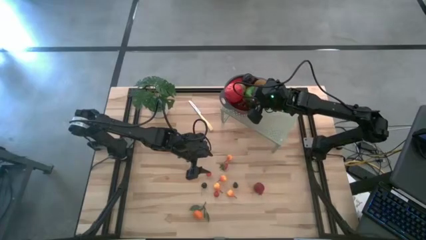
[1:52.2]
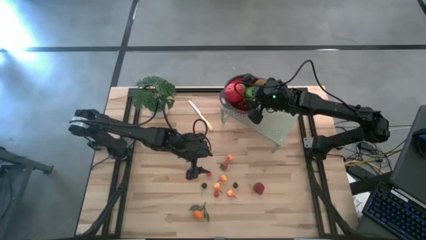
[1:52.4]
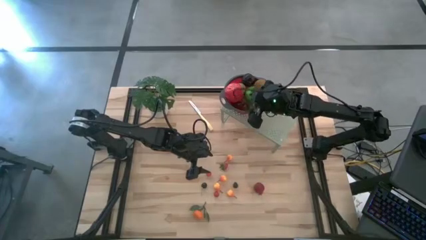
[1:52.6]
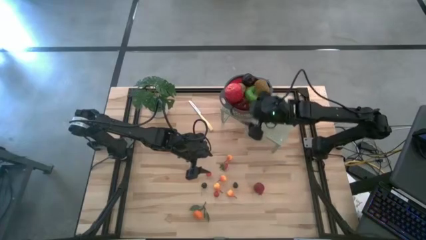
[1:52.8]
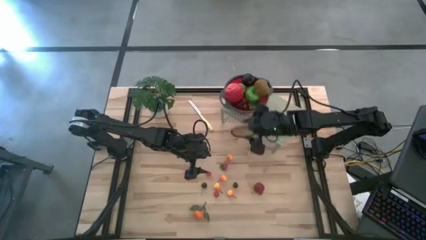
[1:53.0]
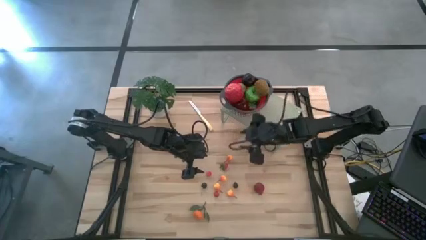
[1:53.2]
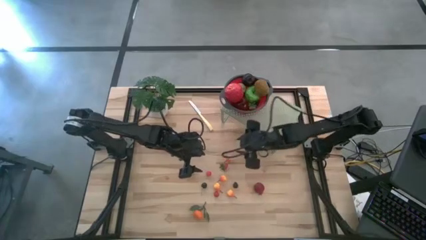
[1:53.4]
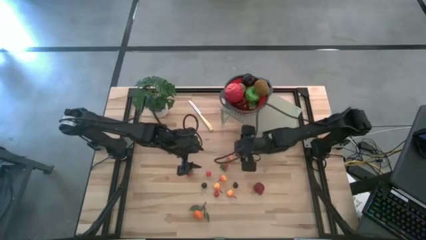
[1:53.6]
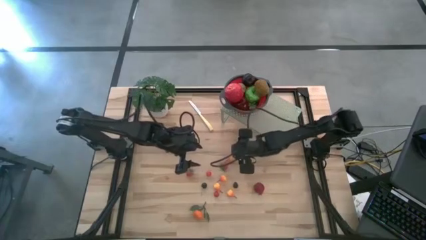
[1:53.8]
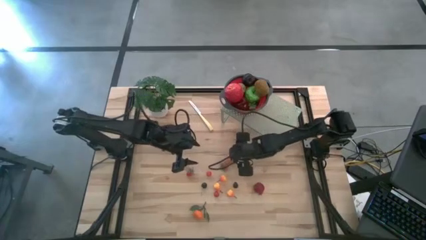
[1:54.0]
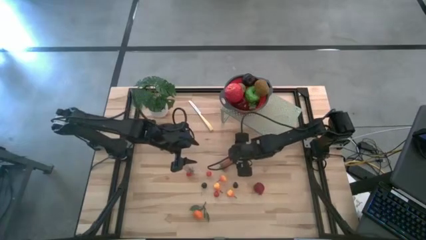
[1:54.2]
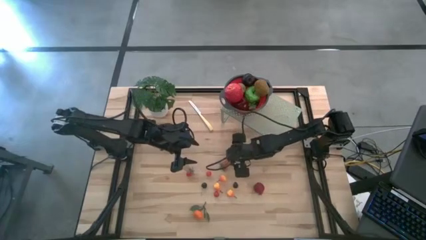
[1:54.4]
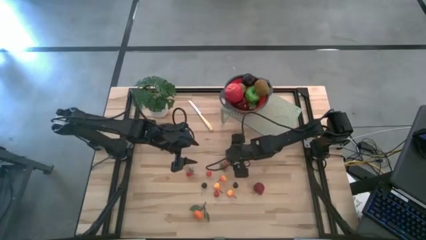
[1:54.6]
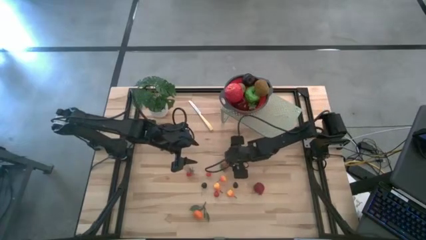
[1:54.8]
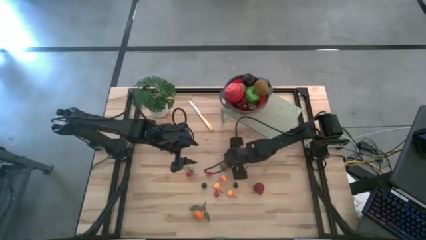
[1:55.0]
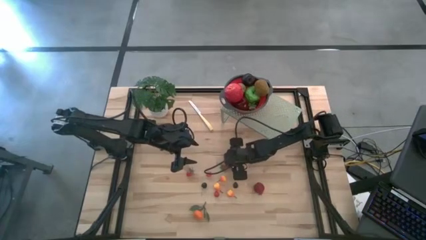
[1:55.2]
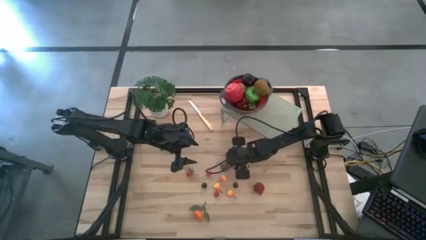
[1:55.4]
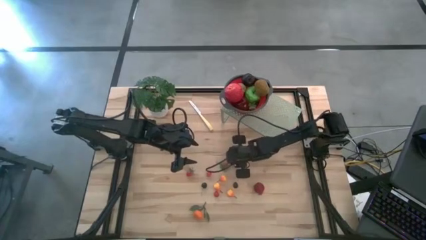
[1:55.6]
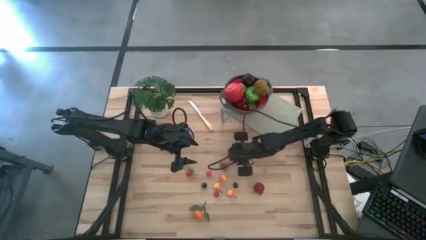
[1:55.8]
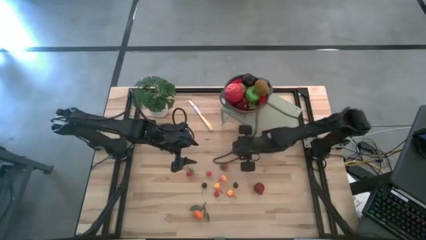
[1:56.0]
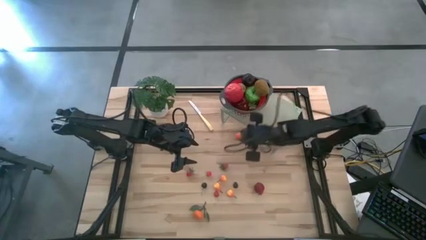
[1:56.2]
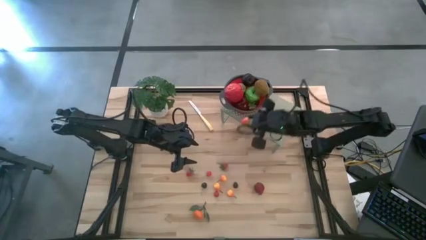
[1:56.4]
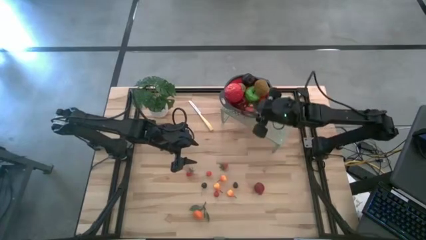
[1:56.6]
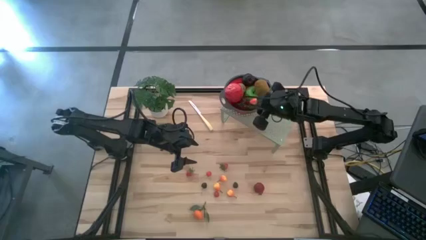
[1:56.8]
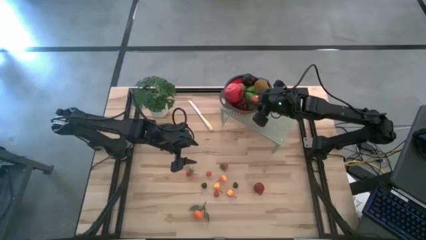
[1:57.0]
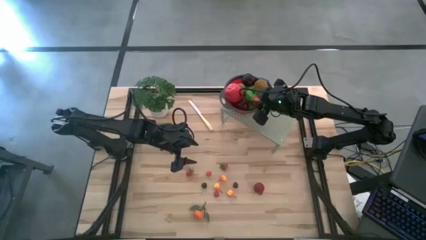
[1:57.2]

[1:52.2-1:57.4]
Task: Pick & Place Fruit
Put the orange pear into the red gray colander on the shelf

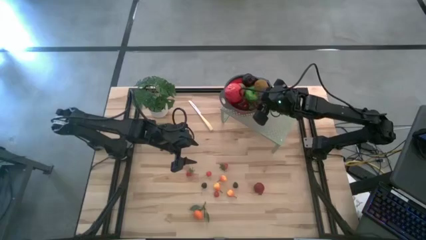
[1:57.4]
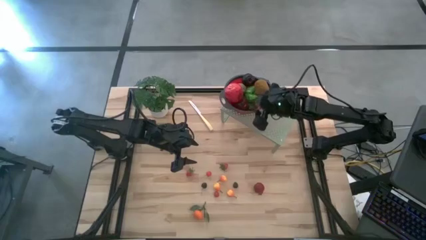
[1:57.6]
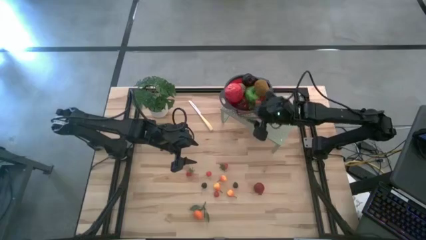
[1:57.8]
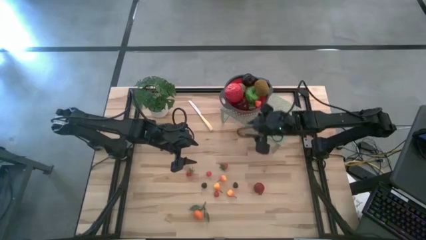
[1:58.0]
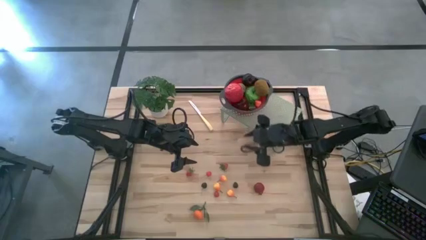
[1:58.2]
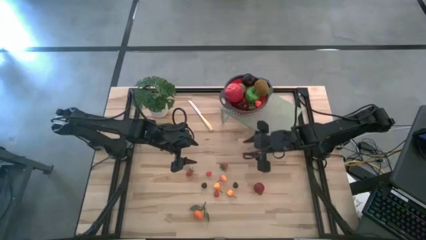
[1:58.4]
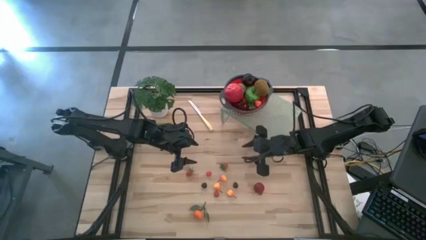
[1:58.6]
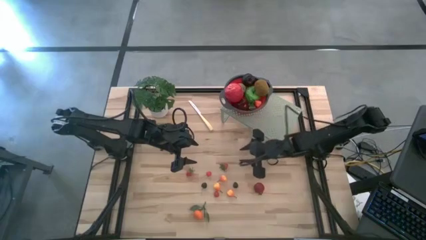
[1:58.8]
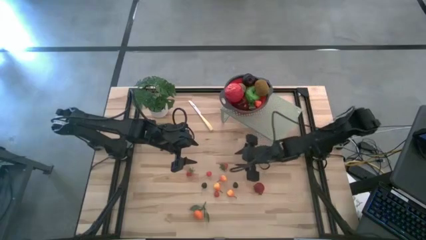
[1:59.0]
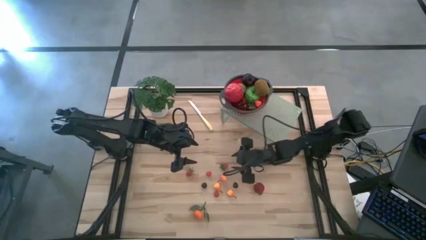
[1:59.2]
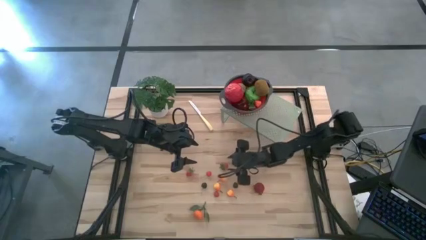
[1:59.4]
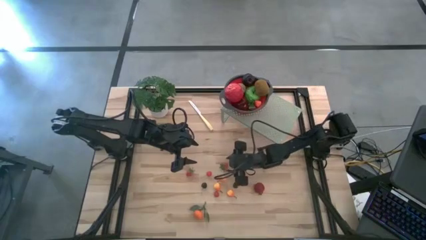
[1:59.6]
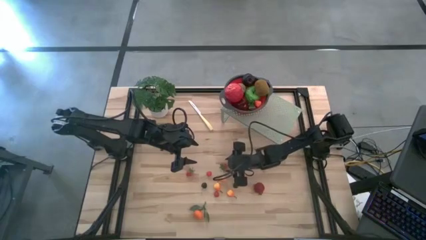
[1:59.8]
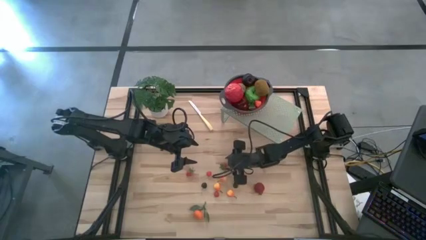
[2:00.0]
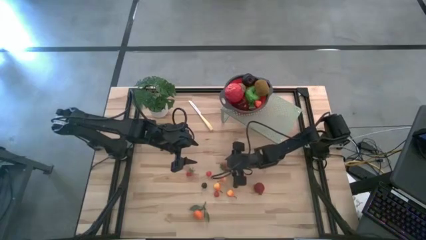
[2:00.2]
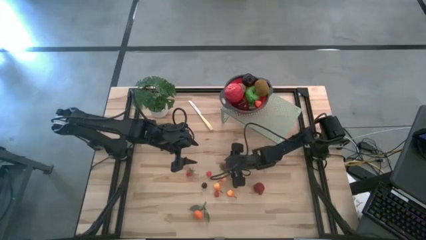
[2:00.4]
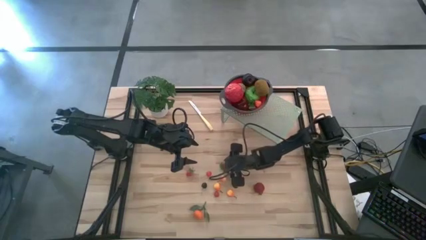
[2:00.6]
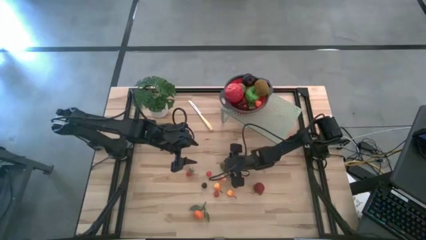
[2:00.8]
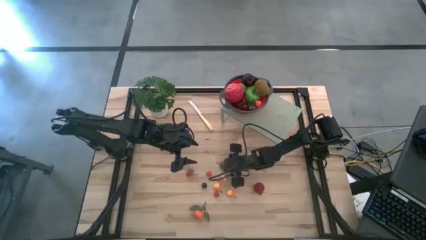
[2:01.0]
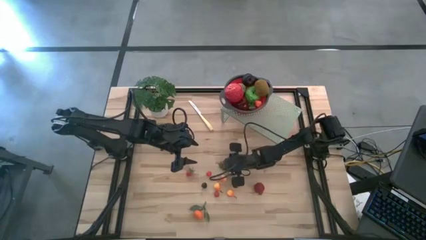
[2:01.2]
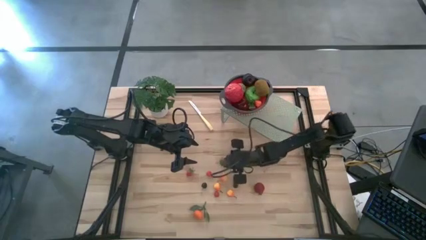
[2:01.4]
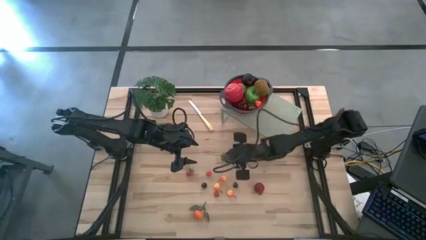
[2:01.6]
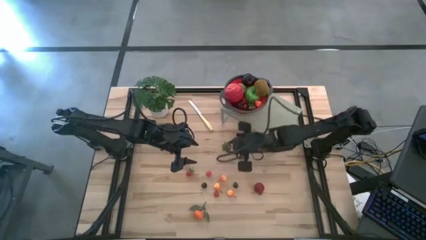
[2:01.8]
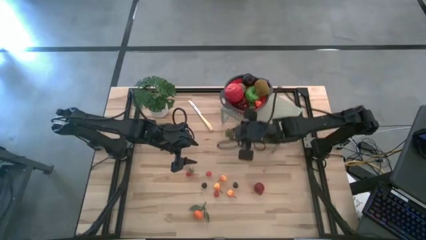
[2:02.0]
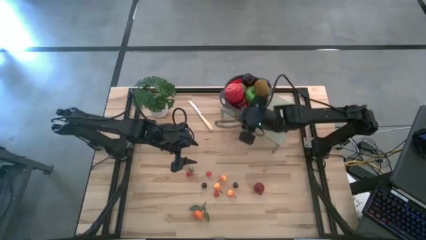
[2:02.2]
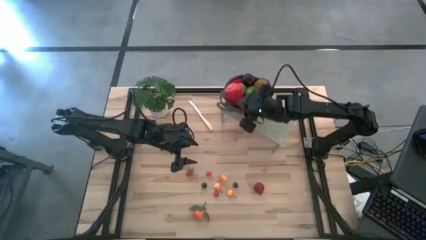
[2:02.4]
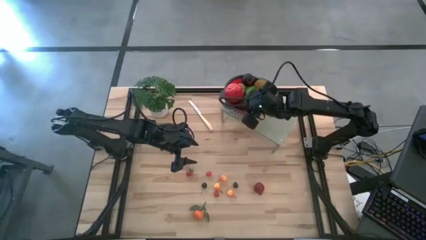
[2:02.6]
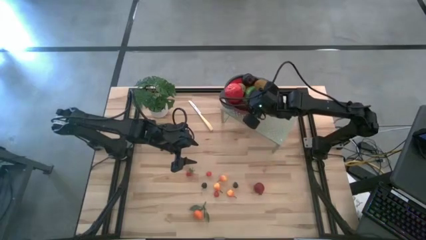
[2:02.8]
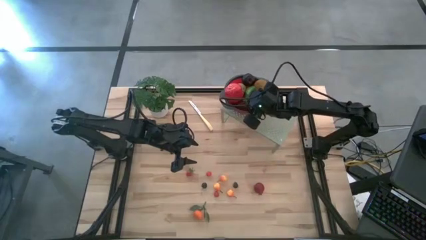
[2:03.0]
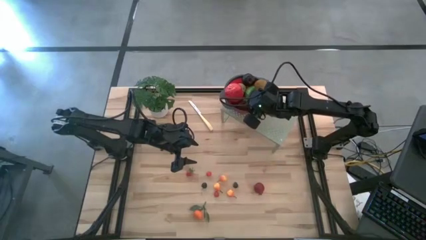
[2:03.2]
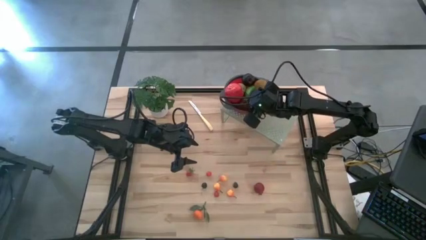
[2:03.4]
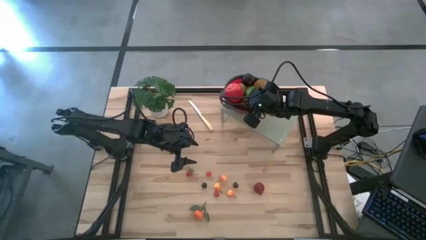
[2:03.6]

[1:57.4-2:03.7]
Put the strawberry into the red gray colander on the shelf

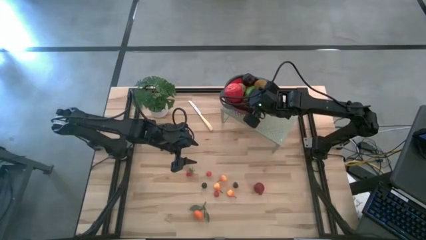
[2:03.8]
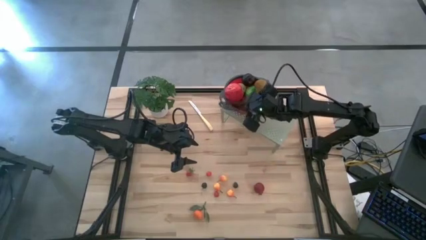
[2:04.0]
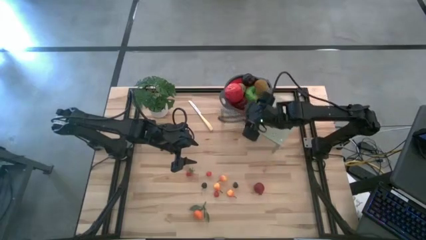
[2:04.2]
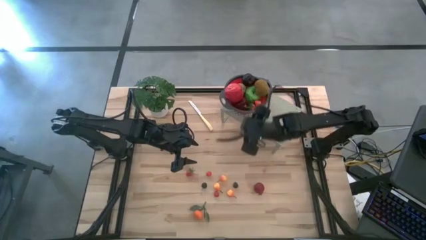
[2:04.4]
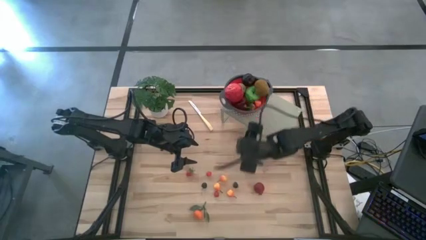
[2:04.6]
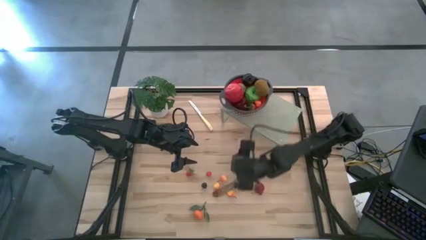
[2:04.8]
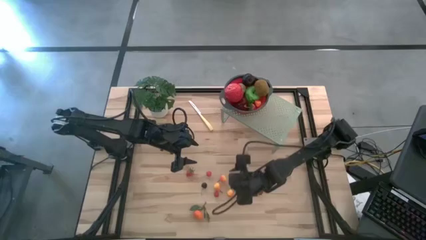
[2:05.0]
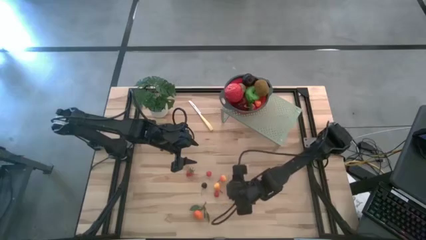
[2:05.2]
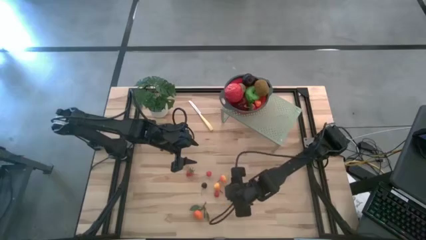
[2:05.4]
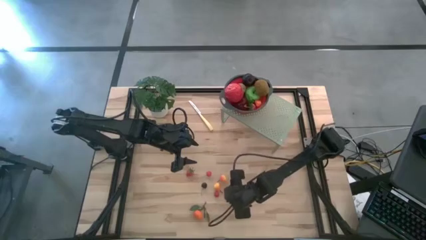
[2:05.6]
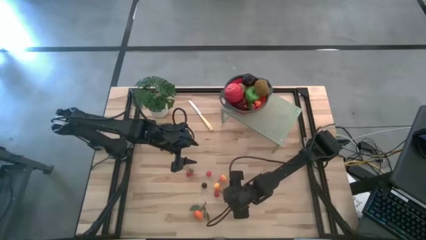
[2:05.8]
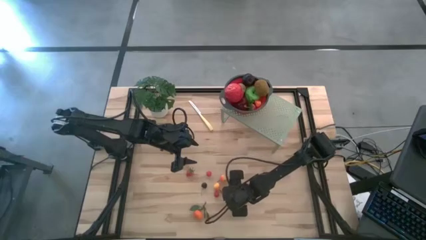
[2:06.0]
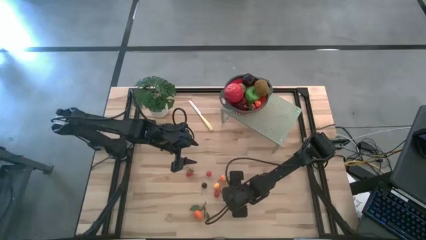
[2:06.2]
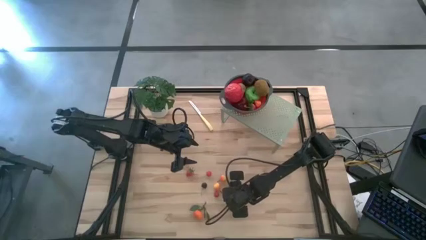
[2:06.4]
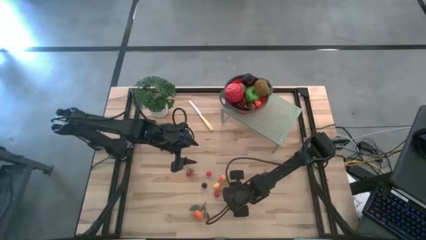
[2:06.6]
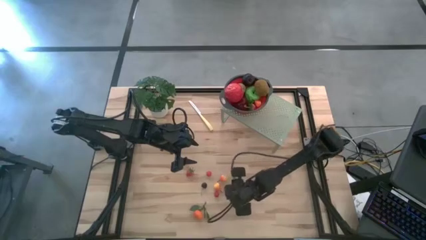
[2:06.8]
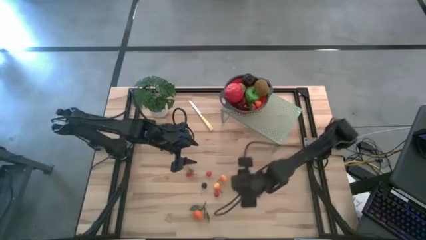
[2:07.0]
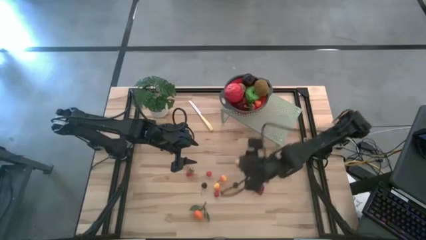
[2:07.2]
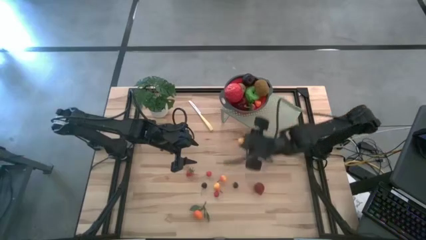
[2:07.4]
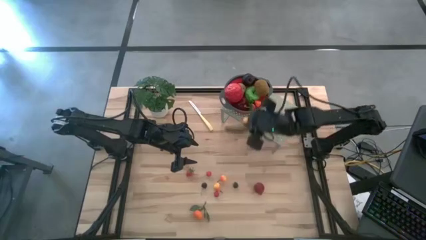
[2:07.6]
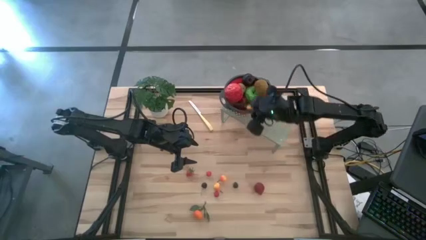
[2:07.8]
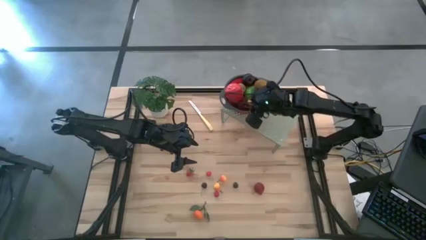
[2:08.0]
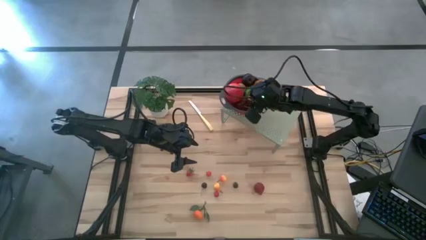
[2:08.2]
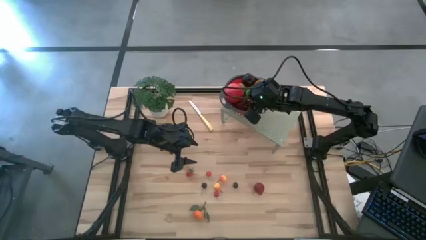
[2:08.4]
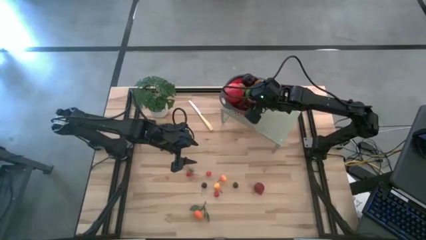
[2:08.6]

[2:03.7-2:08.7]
Put the orange pear into the red gray colander on the shelf
